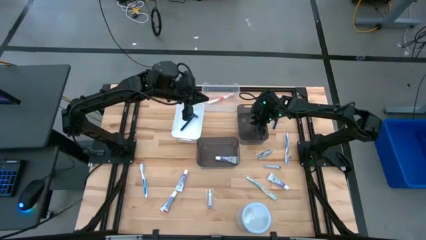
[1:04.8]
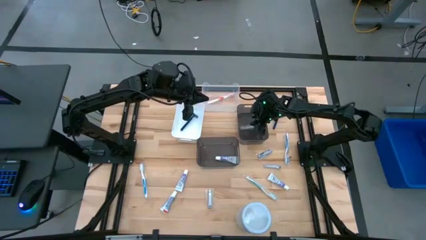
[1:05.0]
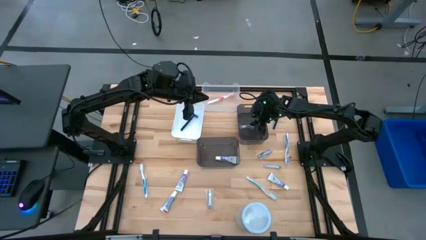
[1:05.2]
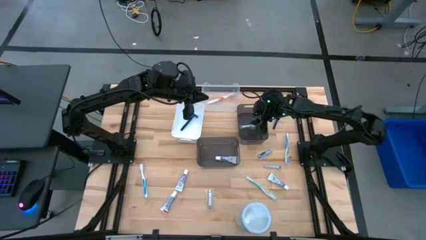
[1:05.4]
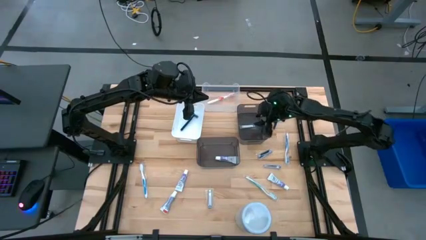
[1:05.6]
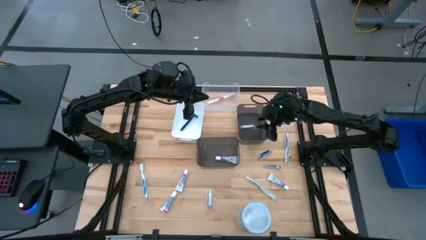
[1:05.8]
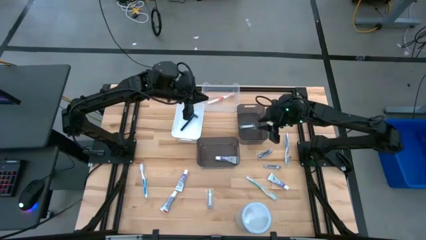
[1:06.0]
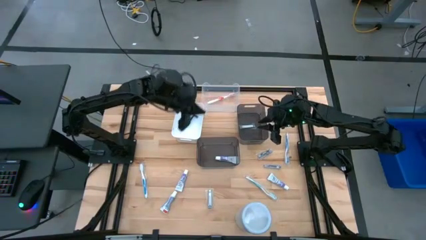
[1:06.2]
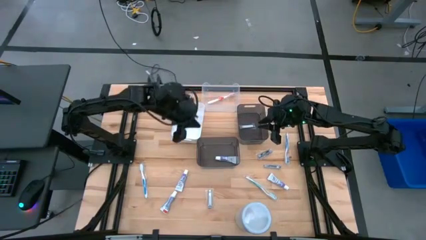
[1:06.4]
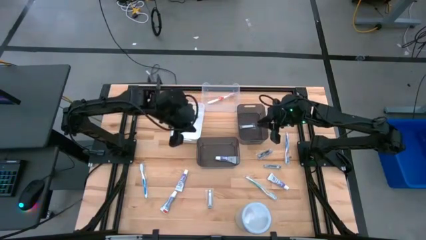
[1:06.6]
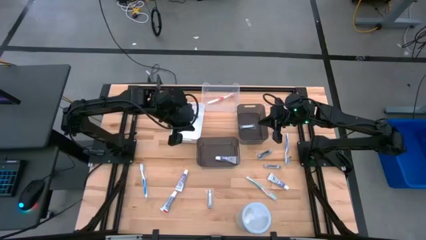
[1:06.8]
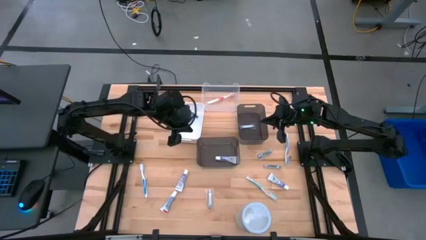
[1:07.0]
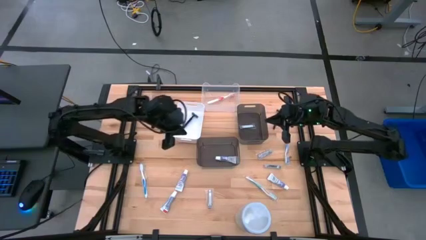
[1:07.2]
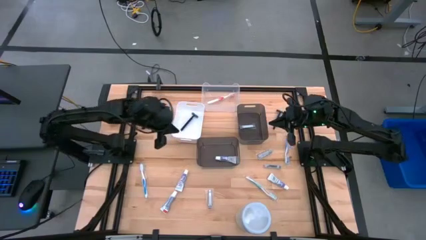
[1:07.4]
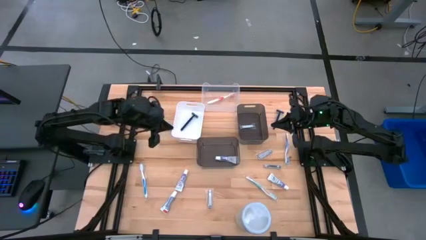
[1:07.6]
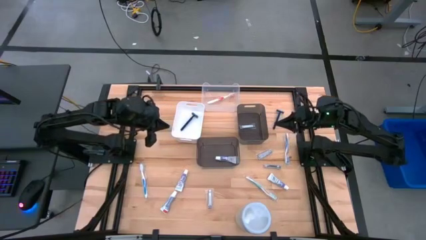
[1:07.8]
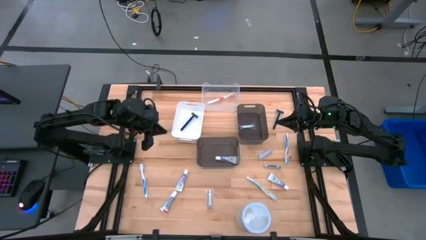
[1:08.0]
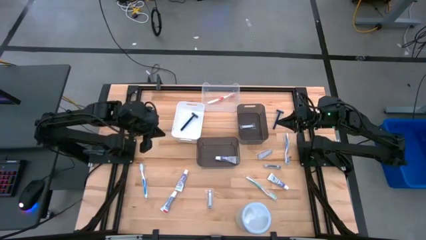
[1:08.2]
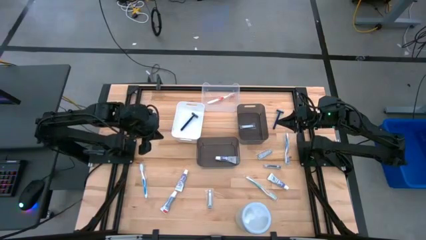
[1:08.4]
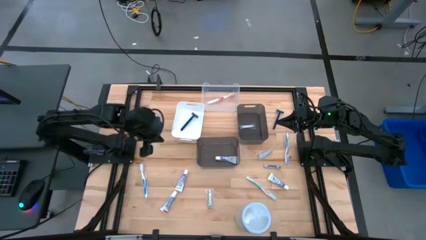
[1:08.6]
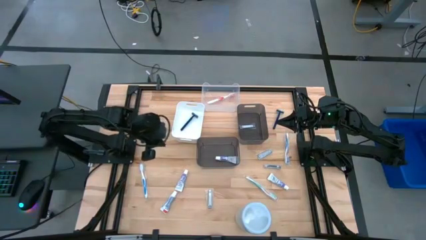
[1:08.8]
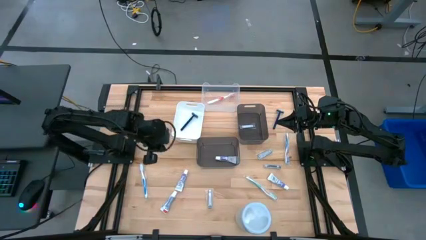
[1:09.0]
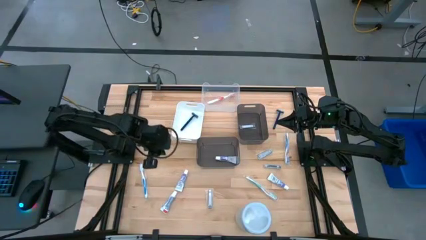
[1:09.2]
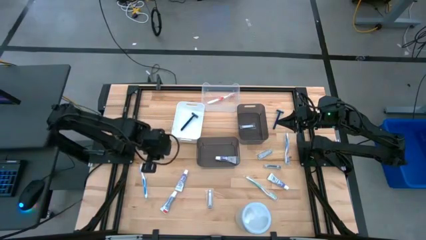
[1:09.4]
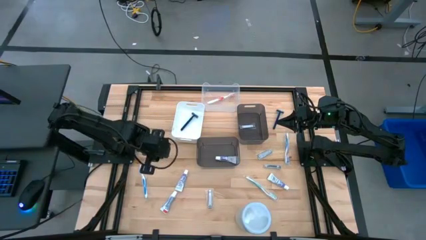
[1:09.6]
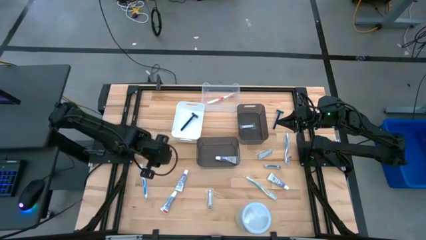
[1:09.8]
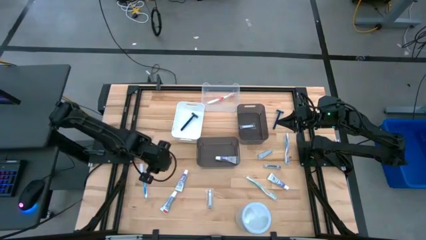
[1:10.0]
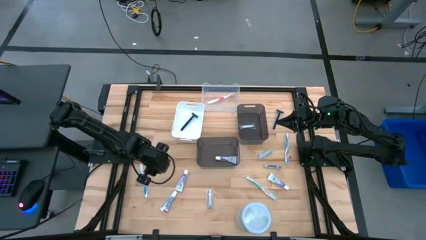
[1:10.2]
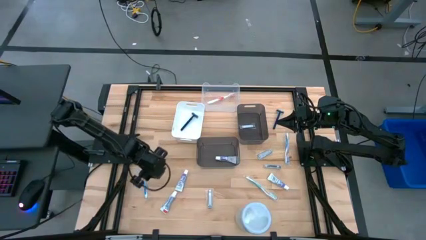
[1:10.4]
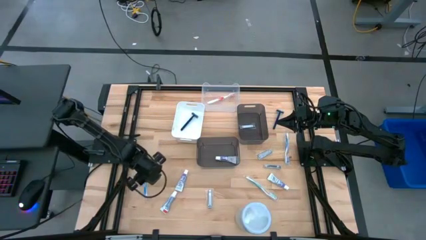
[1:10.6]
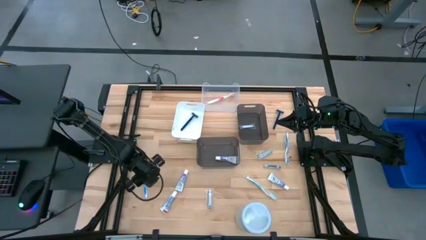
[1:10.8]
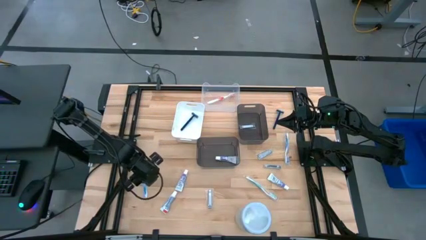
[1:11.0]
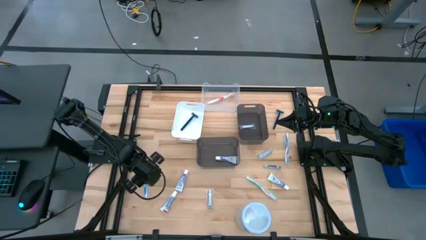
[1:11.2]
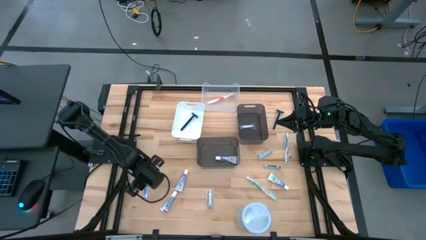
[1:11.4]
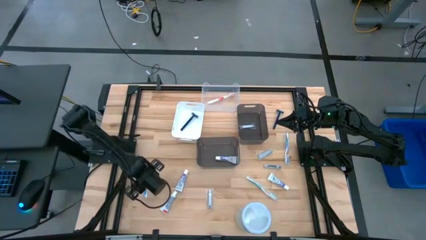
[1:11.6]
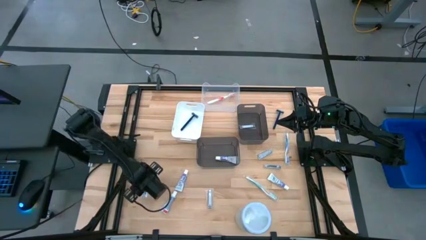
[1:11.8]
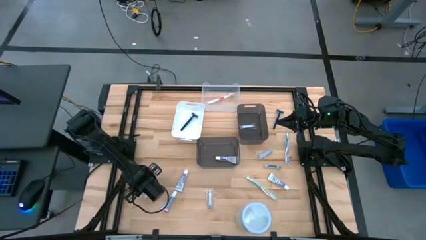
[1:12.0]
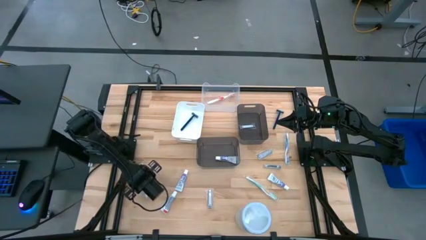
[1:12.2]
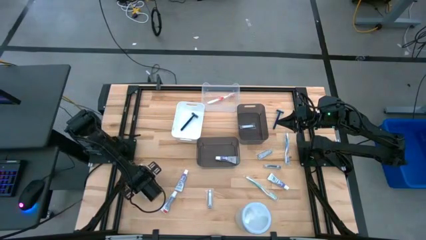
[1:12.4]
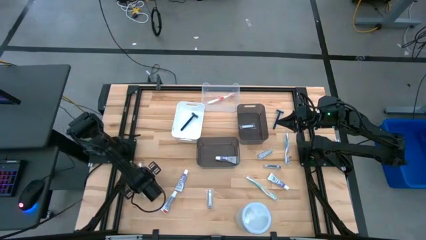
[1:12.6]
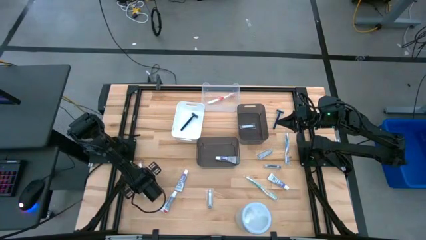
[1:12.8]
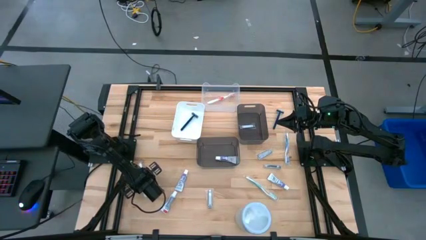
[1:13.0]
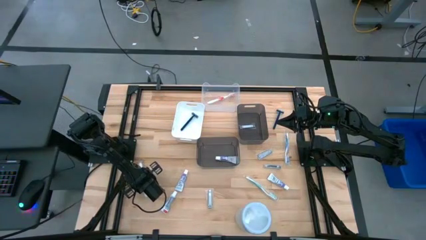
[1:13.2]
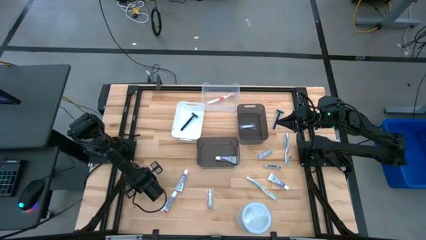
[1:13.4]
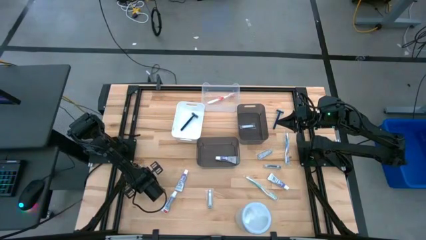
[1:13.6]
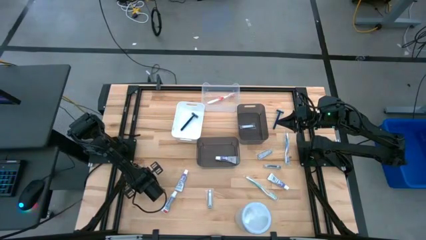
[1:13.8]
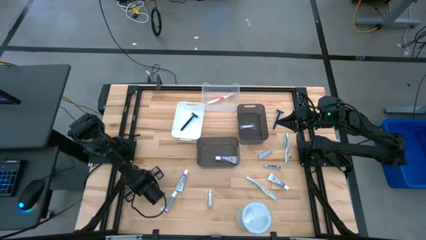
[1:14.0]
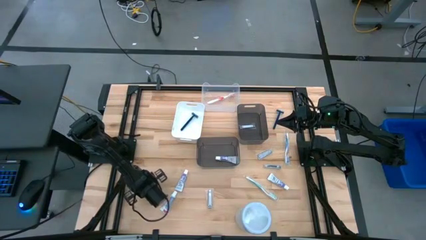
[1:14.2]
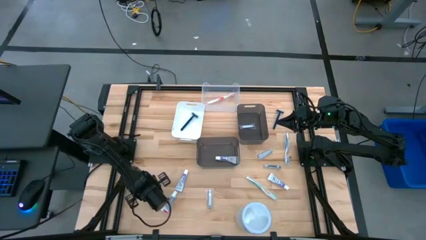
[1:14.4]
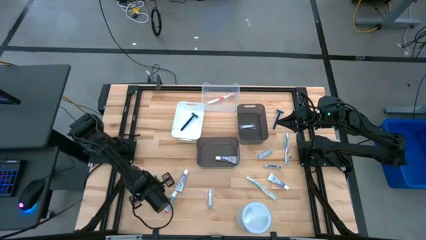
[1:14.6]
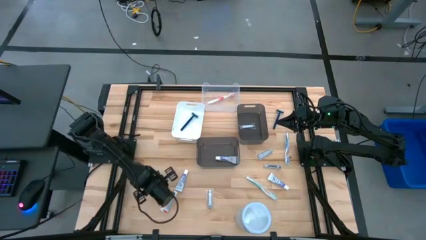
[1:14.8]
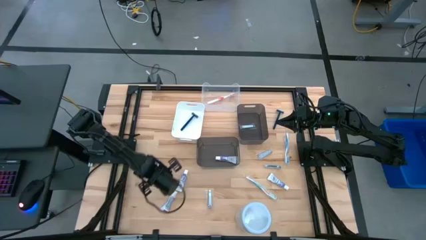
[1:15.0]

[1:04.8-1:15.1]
Task: Pick & Place Travel size toiletries
Put the blue toothbrush into the transparent bin
